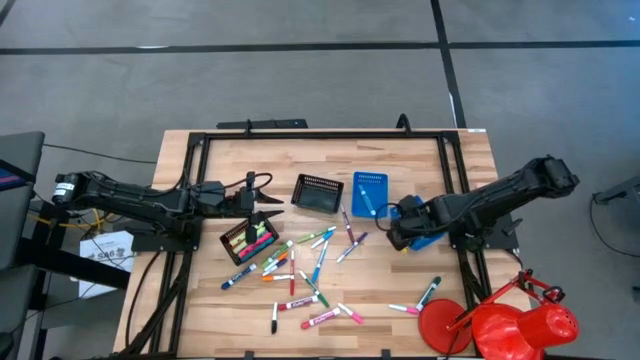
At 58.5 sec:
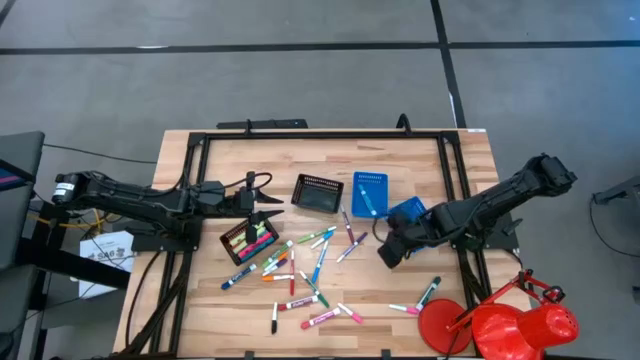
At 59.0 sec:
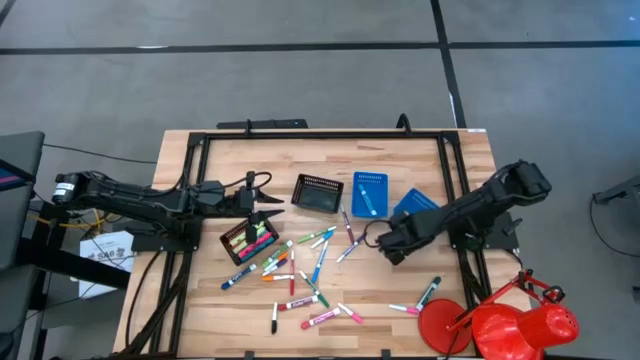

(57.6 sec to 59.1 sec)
Task: Pick & Place Markers
Adjust the right blue bin

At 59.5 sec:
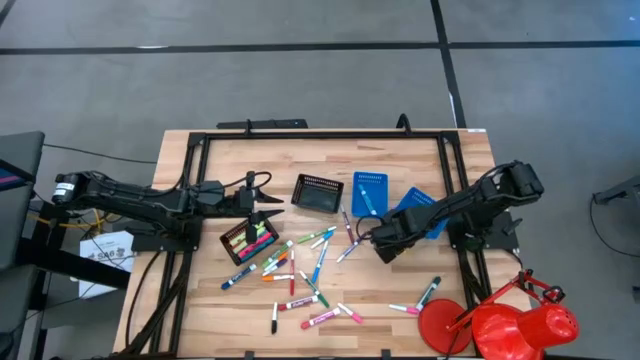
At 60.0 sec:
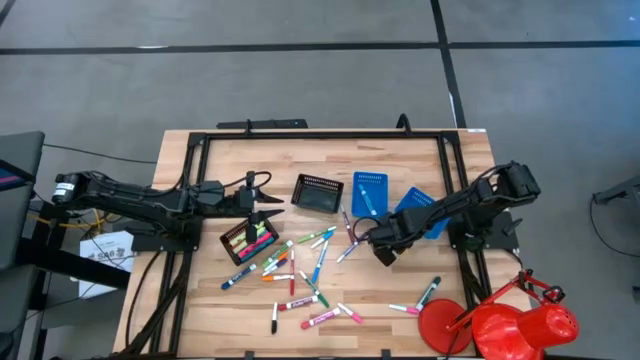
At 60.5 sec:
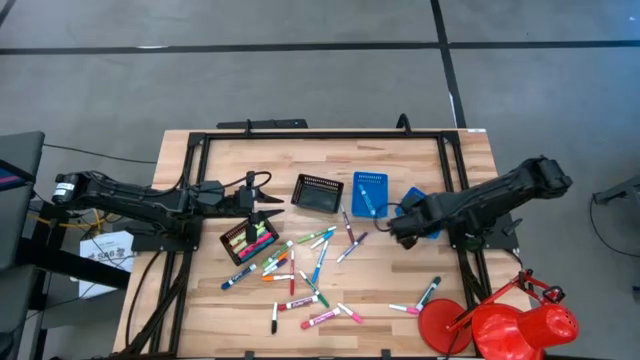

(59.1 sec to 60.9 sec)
Put the yellow highlighter into the right blue bin

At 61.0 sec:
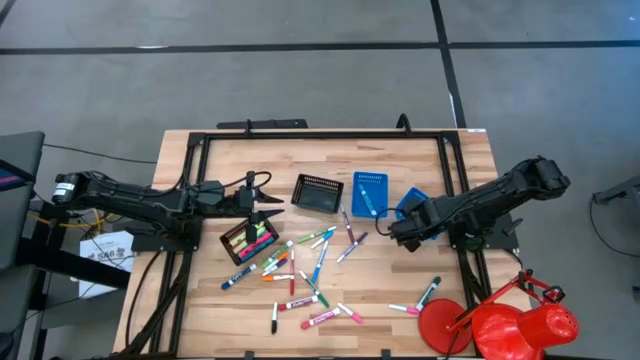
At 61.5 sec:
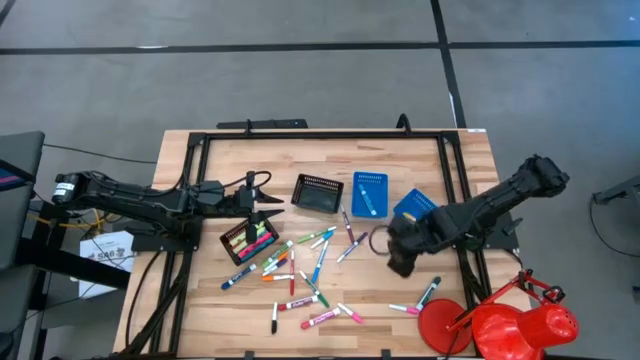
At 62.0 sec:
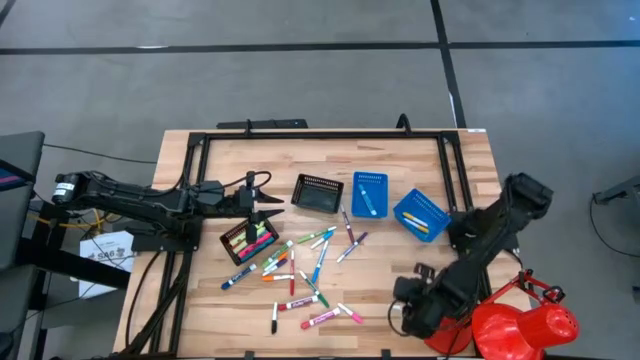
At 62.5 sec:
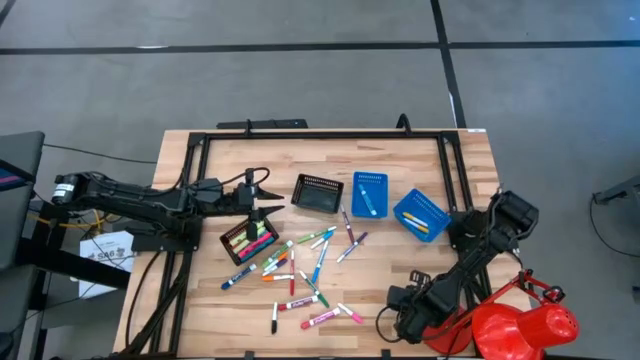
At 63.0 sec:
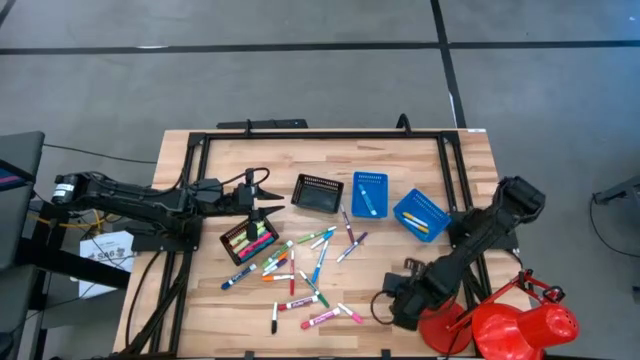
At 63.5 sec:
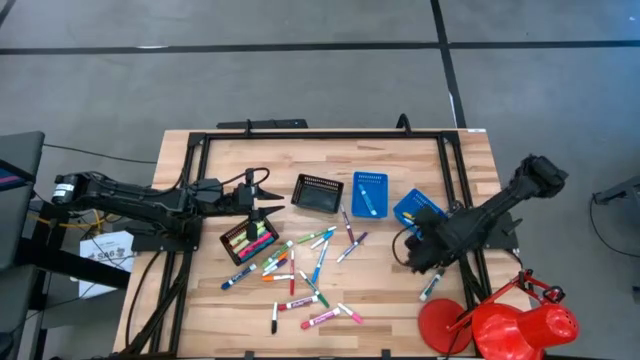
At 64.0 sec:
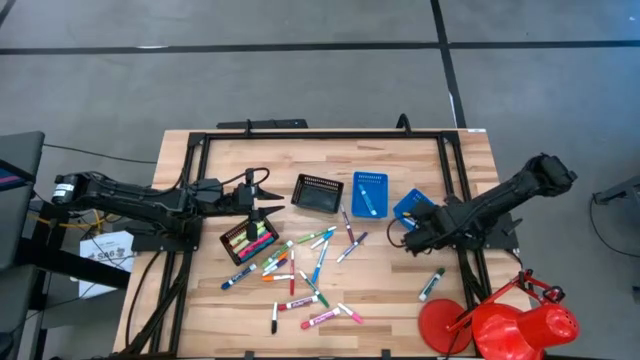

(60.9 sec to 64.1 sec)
Put the right pink highlighter into the right blue bin

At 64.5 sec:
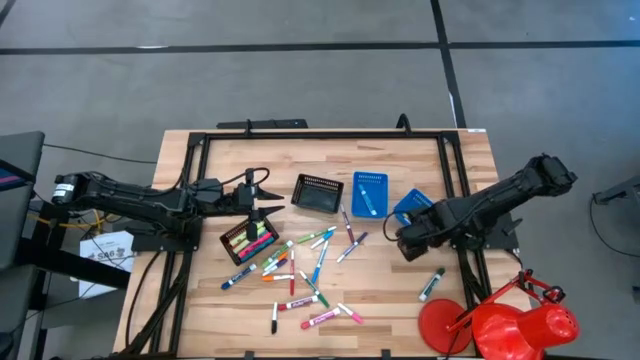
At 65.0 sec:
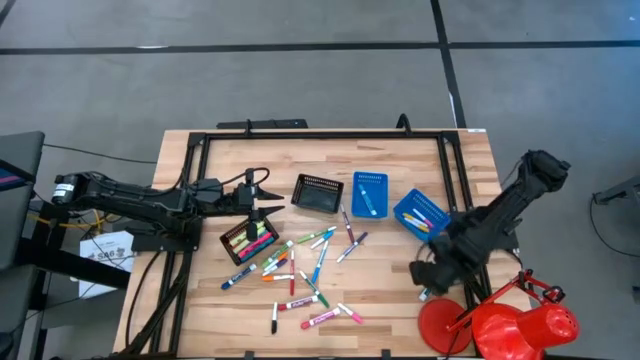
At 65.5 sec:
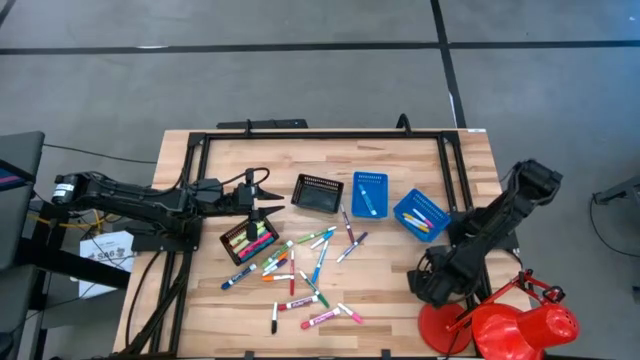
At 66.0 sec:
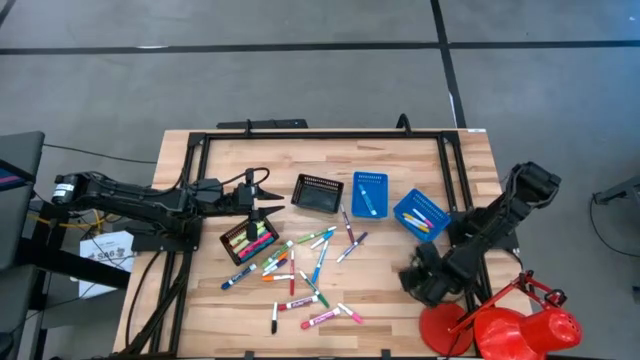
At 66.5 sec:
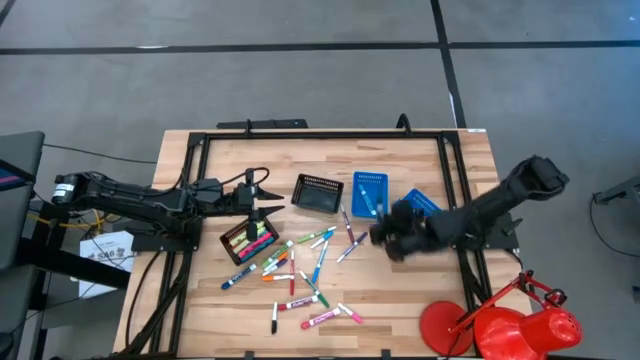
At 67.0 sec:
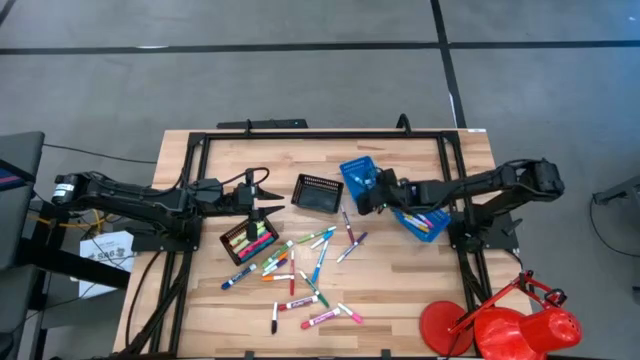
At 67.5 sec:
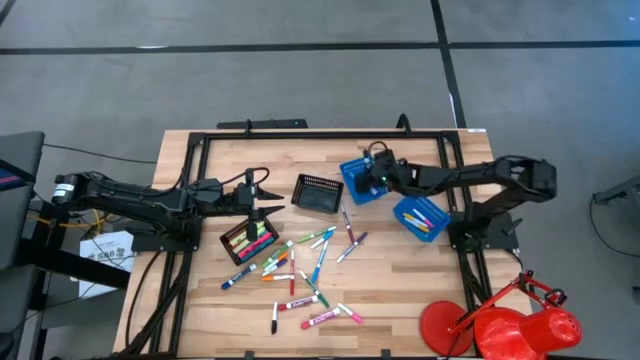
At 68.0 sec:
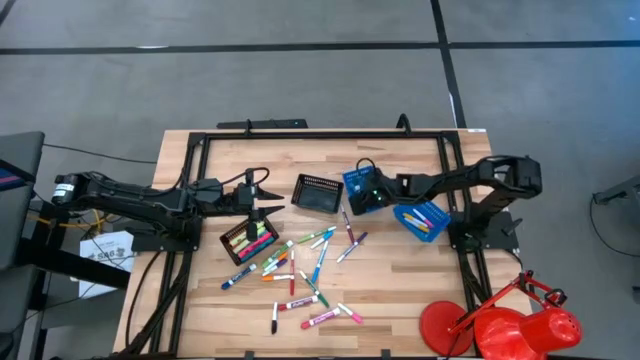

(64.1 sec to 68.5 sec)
Put the large green marker into the left blue bin

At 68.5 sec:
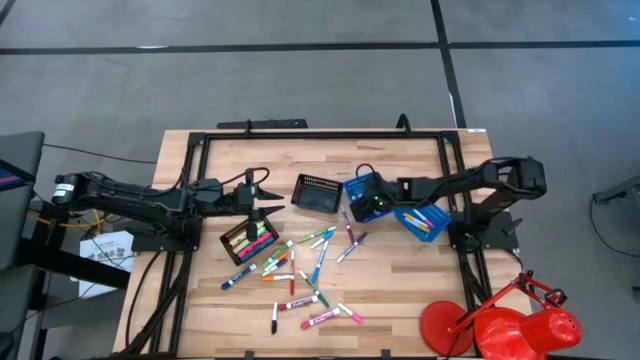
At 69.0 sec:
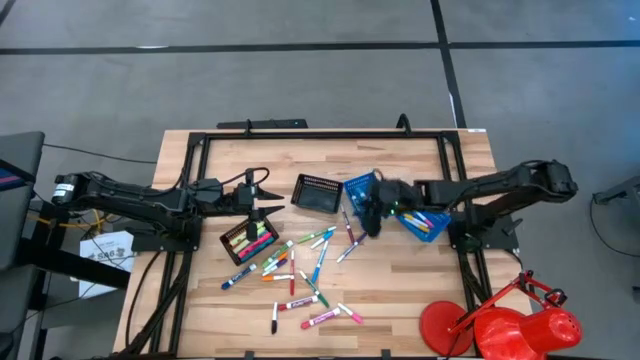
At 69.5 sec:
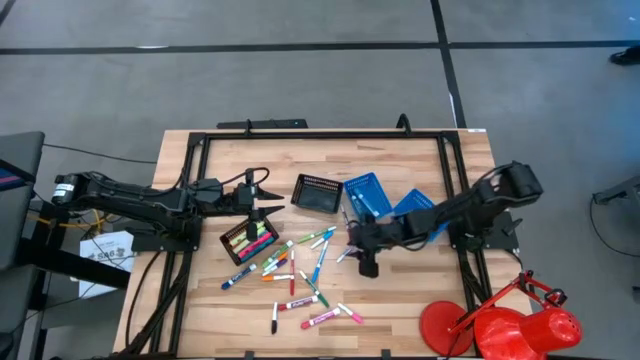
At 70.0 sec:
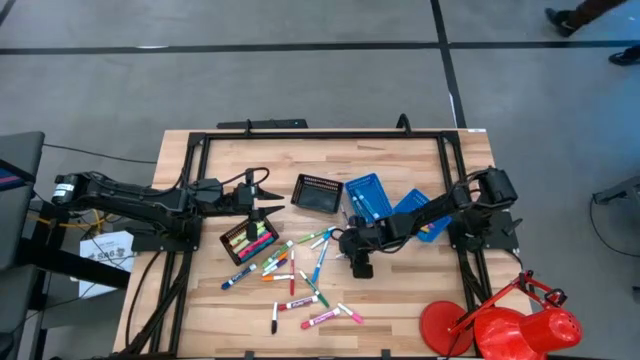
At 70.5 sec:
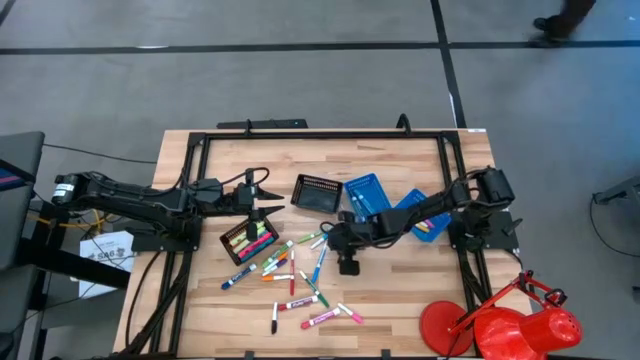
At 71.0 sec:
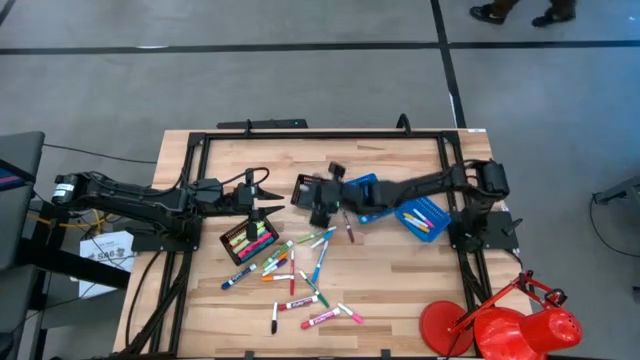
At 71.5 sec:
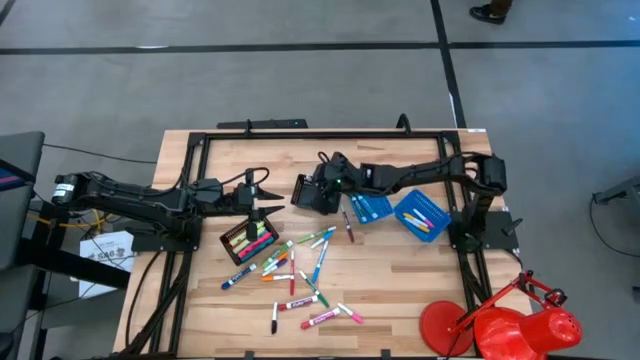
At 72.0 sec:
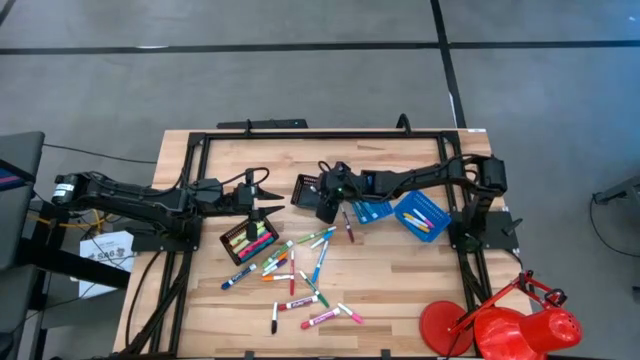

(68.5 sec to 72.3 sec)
Put the small dark blue marker into the right black bin

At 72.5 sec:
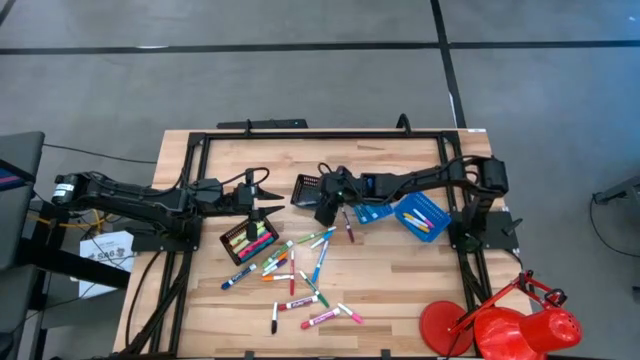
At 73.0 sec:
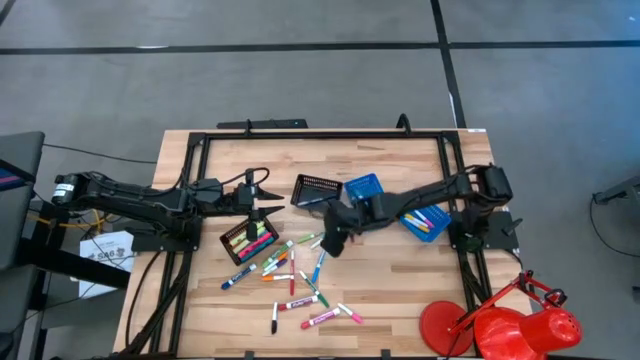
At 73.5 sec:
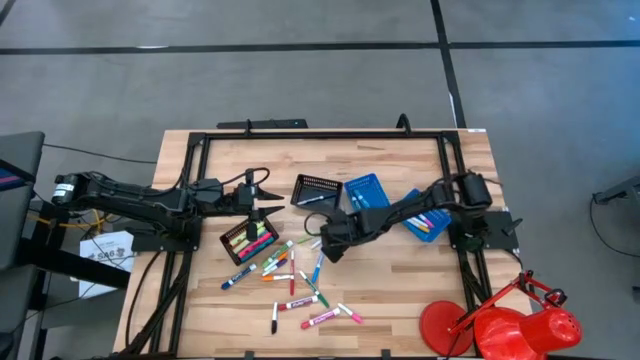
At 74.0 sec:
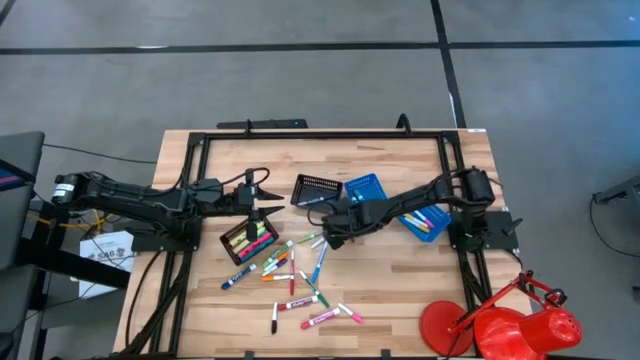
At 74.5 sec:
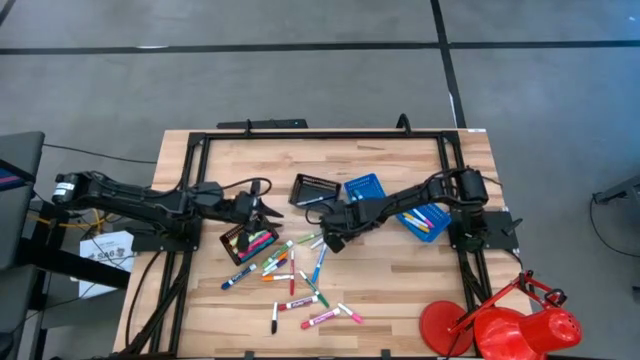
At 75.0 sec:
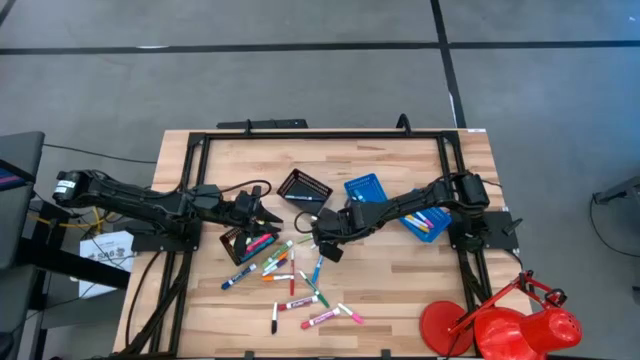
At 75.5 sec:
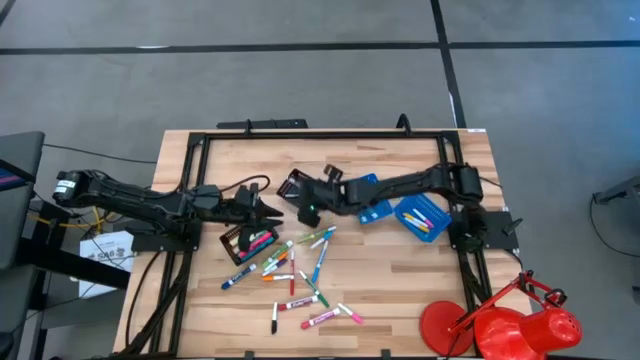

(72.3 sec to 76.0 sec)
Put the small maroon marker into the right black bin

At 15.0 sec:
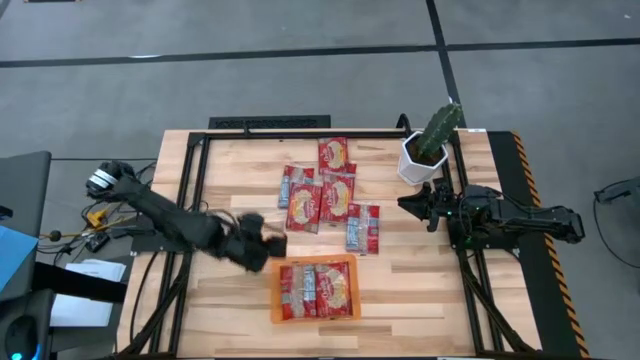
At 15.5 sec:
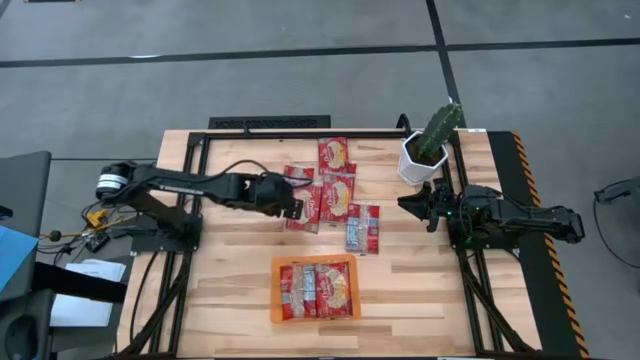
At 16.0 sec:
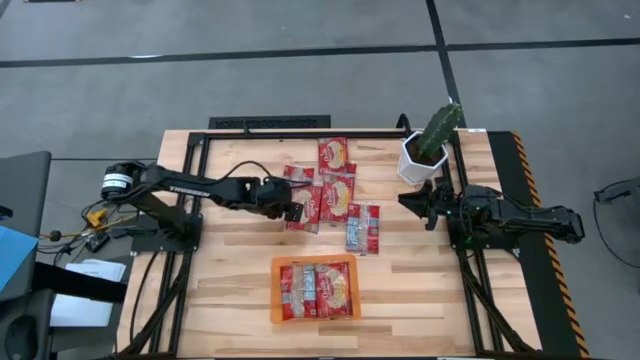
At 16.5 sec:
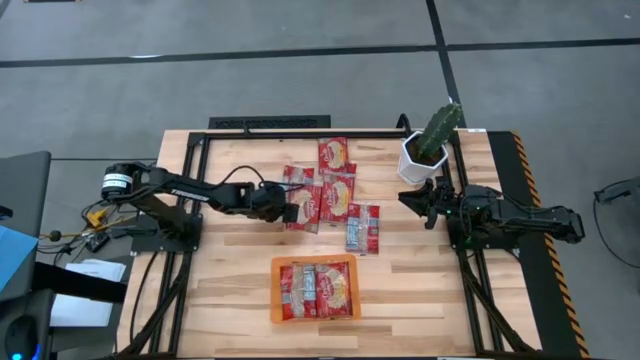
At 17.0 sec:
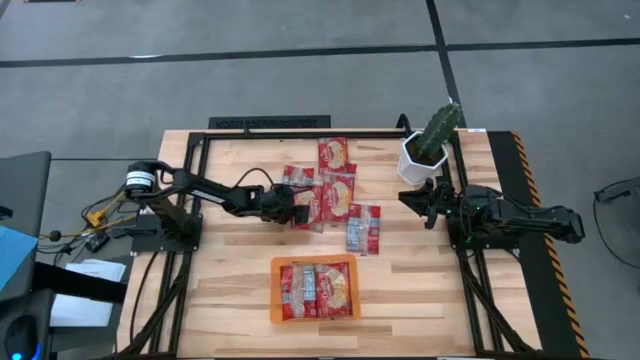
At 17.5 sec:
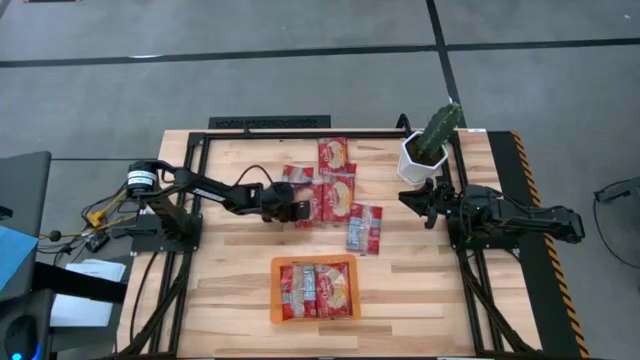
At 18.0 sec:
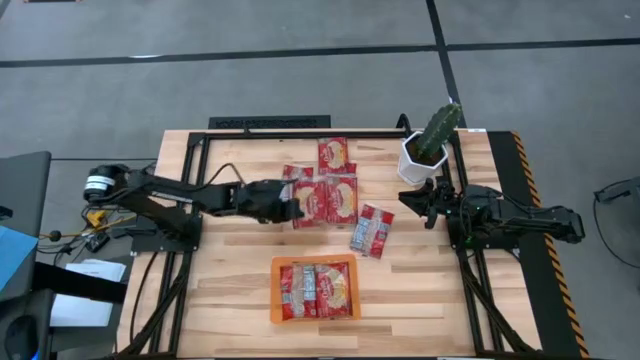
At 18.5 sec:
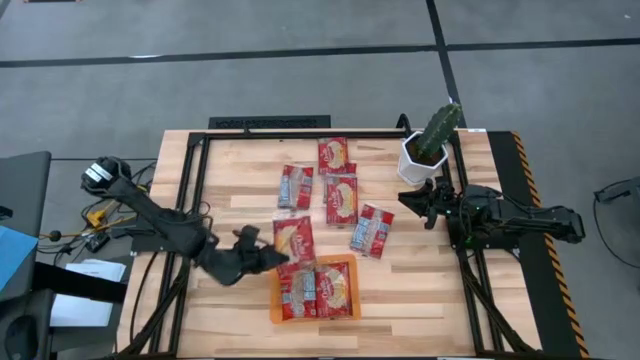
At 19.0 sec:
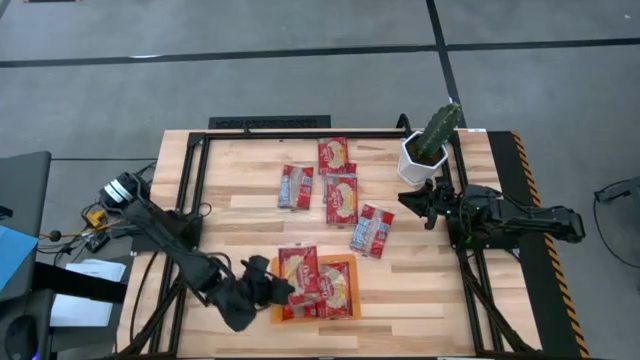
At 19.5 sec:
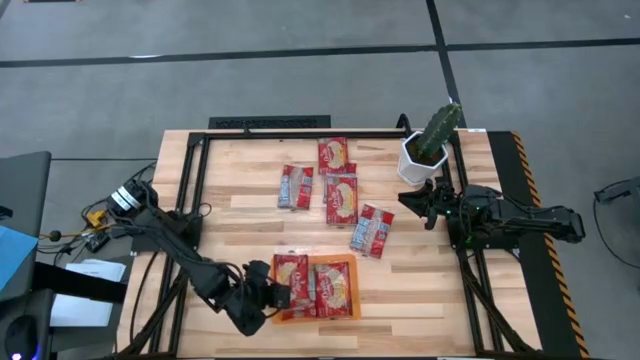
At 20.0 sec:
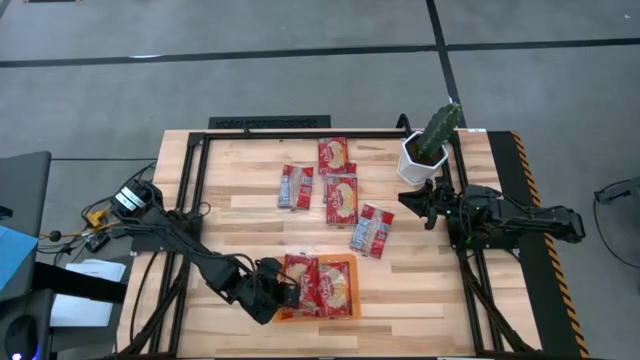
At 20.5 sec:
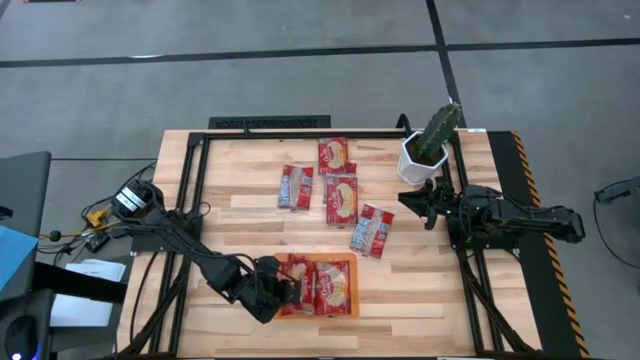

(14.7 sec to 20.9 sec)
Task: Sort popcorn bags into baskets
Put the red popcorn bag into the orange bin
